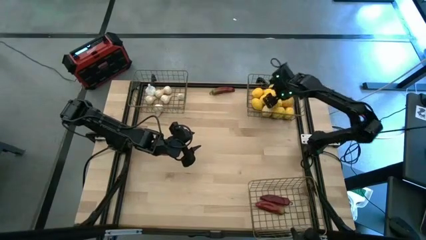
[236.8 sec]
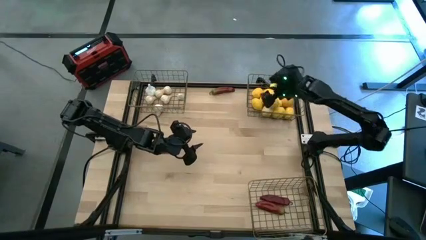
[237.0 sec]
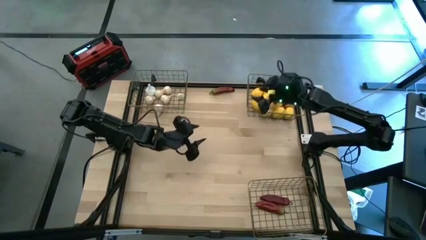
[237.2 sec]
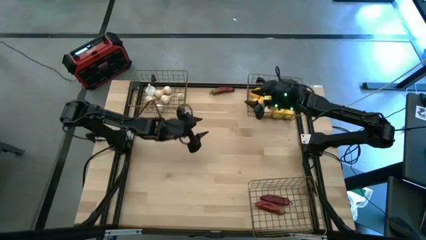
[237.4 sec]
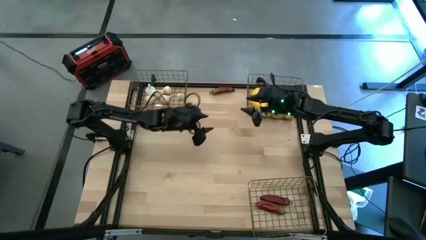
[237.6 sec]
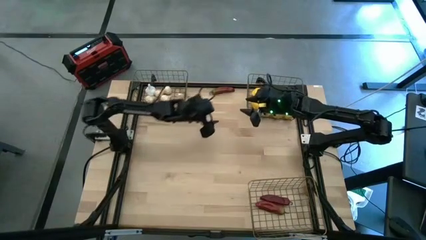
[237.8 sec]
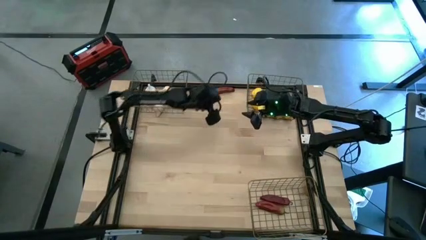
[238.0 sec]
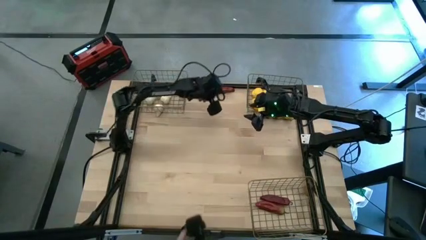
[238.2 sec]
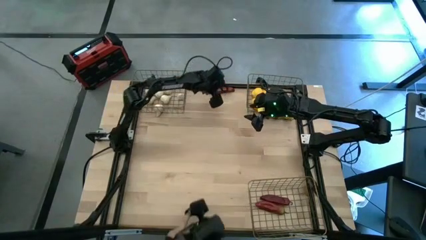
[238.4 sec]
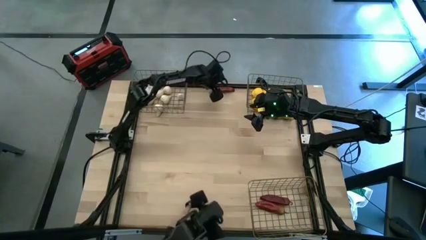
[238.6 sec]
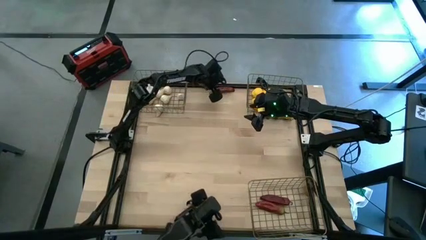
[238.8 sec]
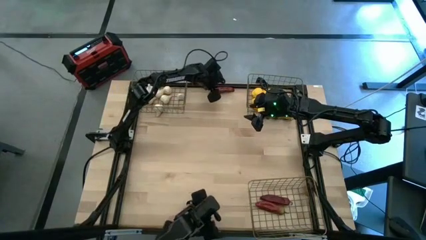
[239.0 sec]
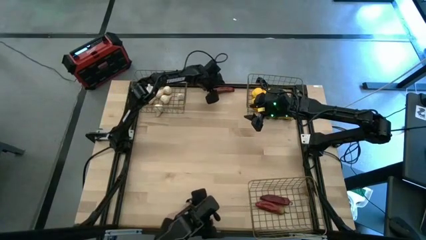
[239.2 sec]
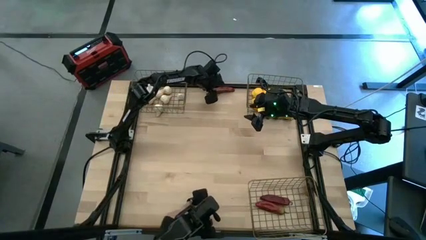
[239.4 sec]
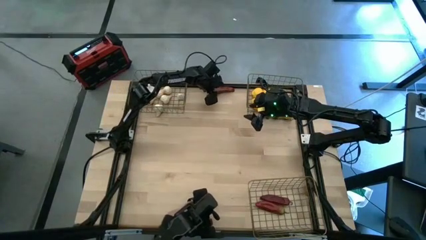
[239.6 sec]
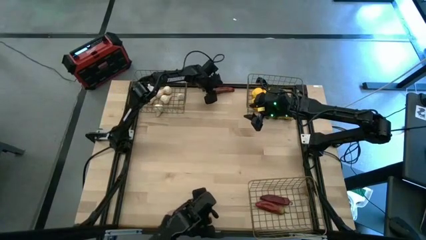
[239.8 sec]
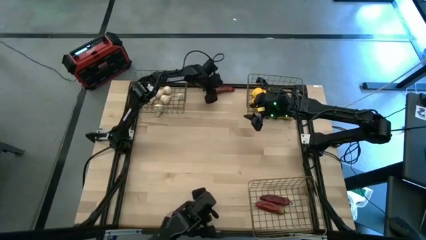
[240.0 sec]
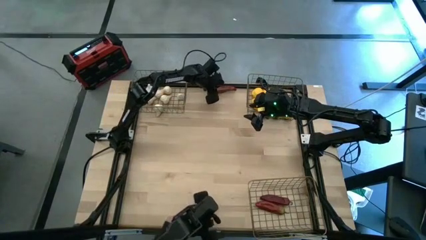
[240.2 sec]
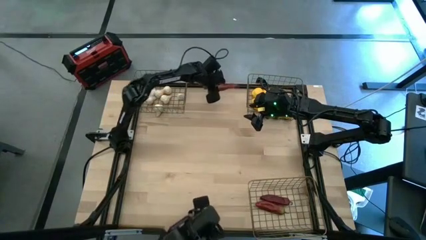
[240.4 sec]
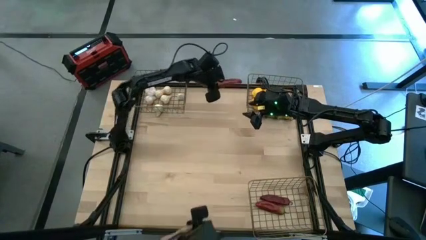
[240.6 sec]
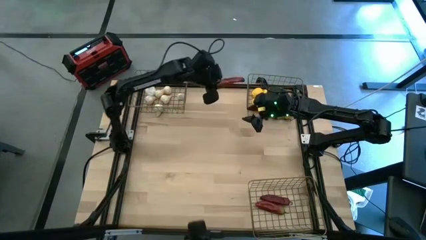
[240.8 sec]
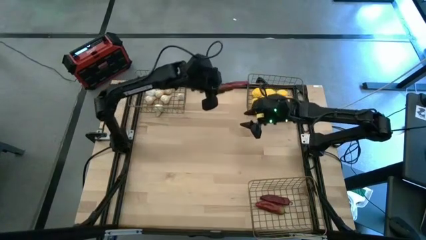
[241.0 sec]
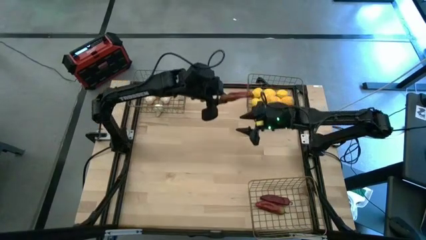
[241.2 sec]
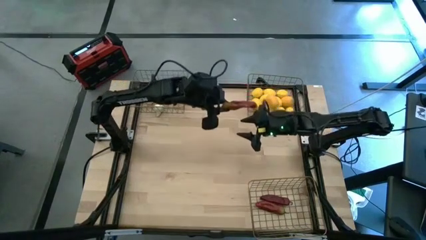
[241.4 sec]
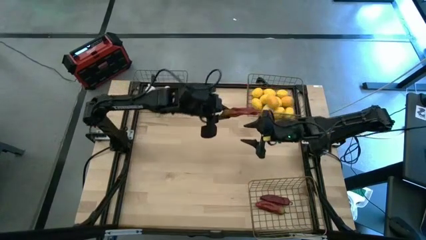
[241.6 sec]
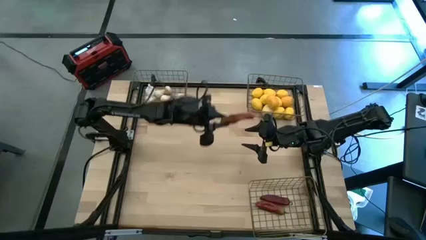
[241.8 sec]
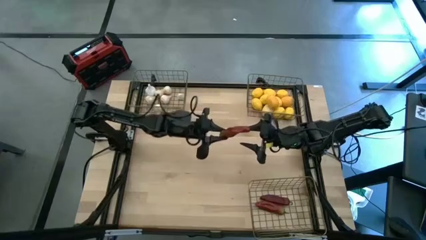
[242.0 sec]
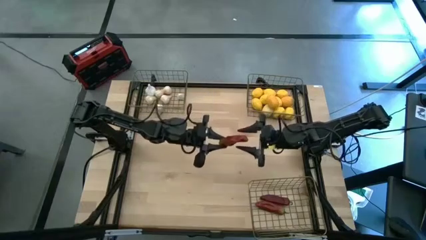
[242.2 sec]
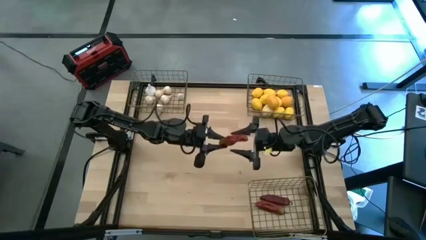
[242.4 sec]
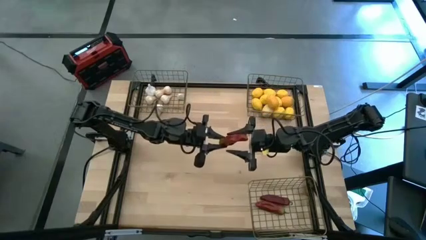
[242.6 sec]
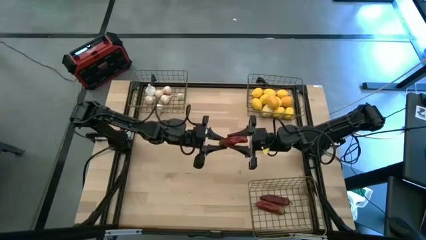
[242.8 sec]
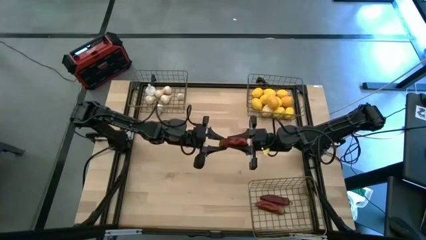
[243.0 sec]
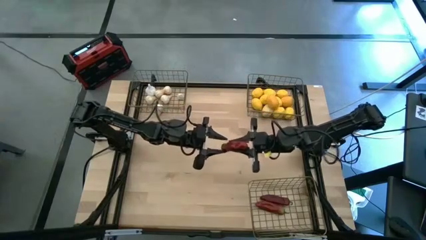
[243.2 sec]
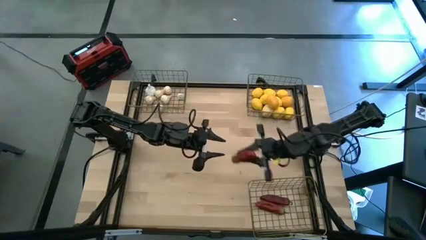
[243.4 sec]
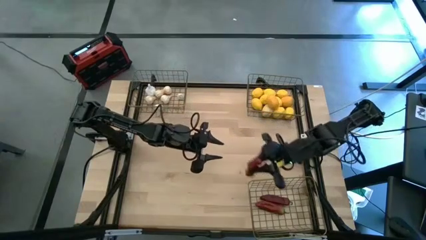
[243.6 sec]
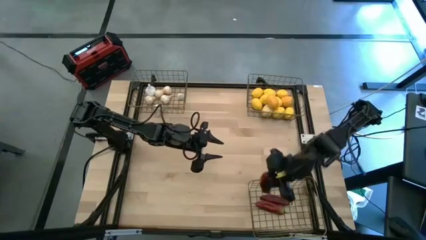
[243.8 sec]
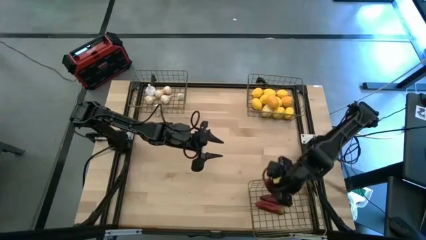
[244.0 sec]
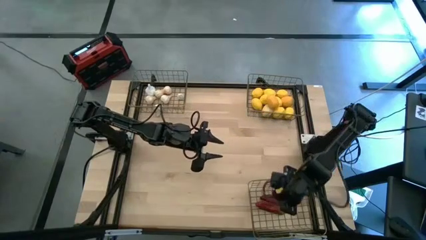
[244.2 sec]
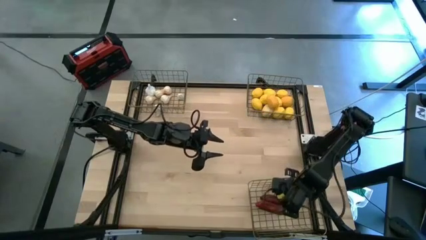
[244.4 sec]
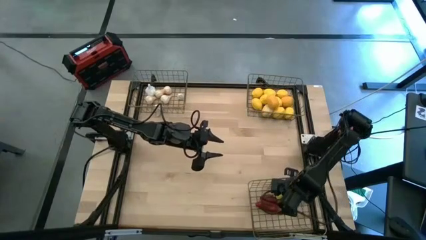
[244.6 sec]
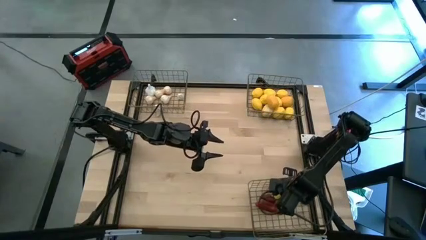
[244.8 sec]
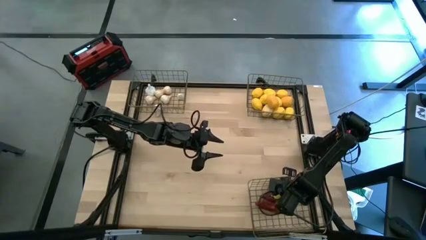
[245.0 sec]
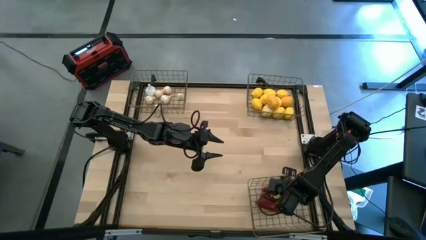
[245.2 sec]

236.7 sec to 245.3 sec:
Task: Sort produce into baskets
Put the red chili pepper into the bottom wire basket

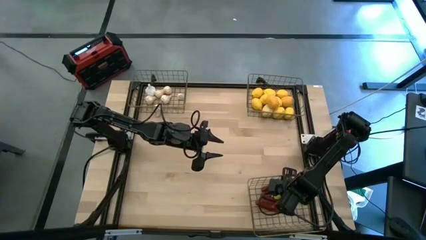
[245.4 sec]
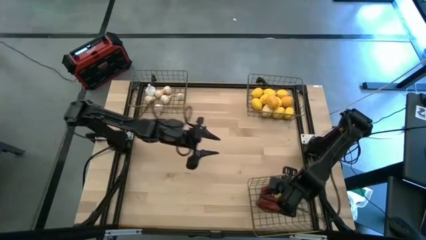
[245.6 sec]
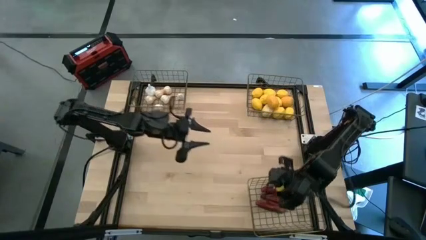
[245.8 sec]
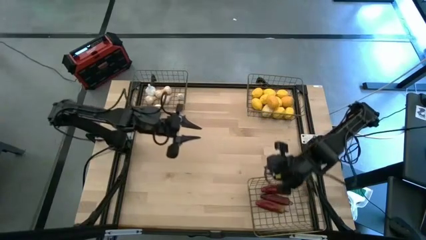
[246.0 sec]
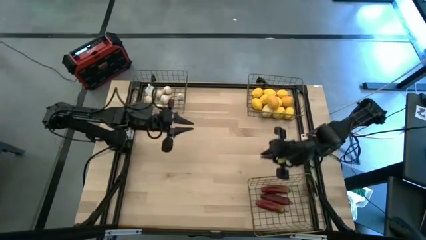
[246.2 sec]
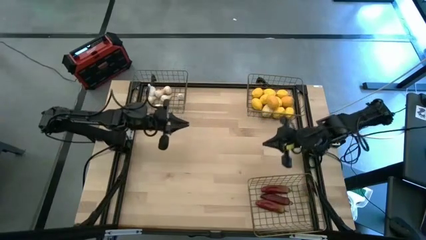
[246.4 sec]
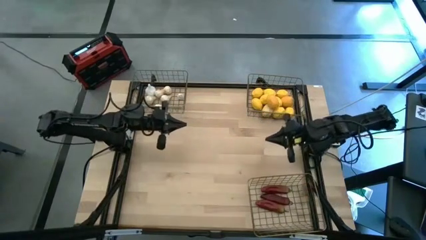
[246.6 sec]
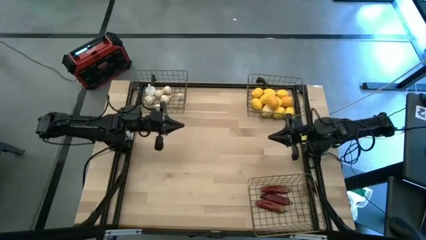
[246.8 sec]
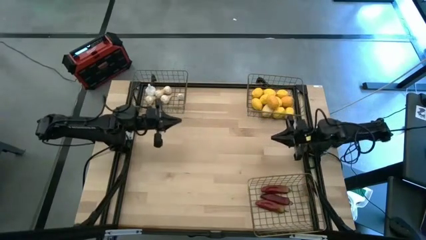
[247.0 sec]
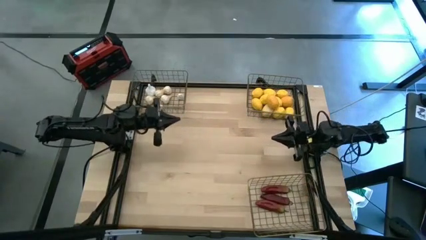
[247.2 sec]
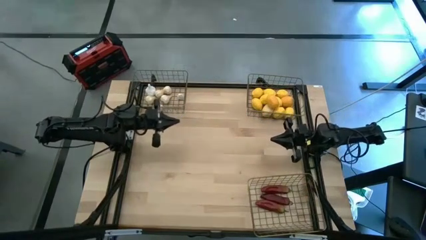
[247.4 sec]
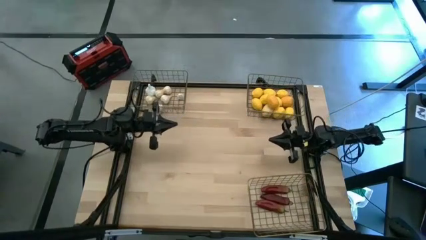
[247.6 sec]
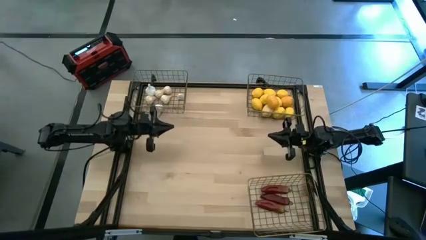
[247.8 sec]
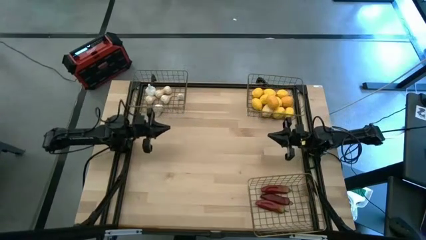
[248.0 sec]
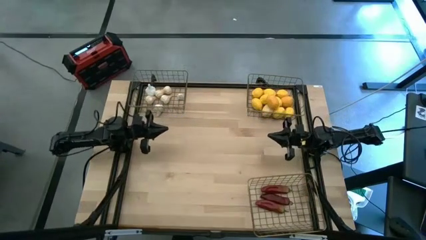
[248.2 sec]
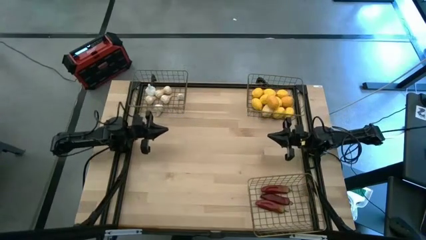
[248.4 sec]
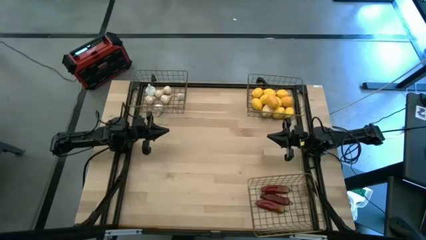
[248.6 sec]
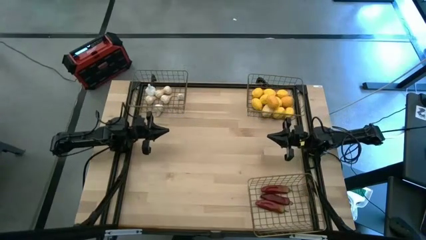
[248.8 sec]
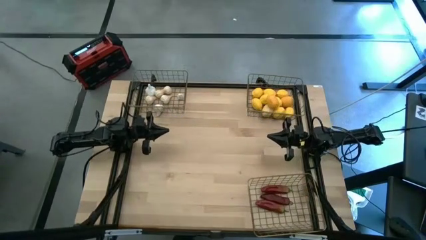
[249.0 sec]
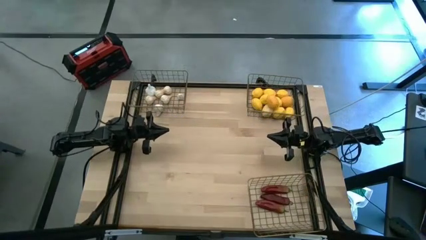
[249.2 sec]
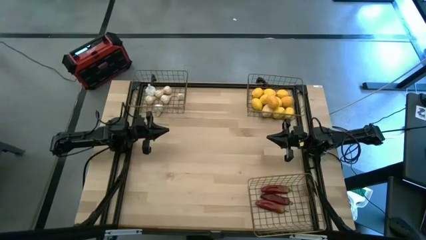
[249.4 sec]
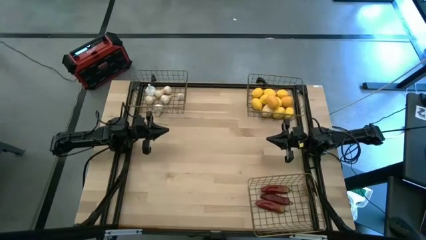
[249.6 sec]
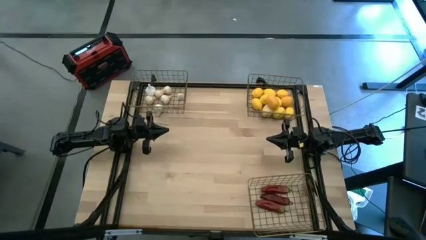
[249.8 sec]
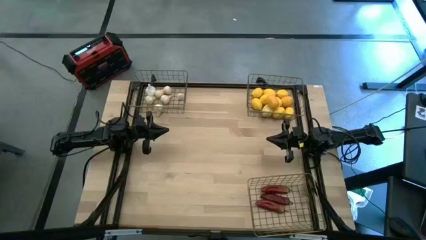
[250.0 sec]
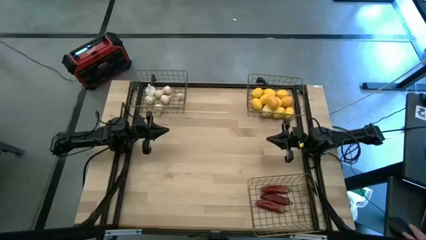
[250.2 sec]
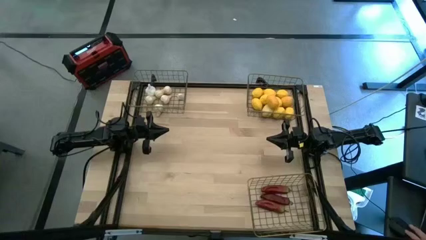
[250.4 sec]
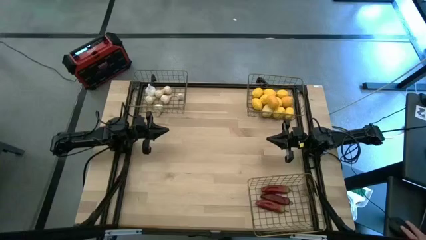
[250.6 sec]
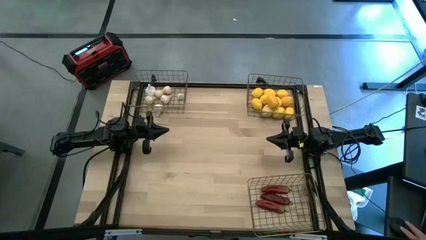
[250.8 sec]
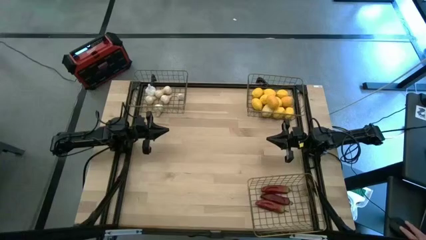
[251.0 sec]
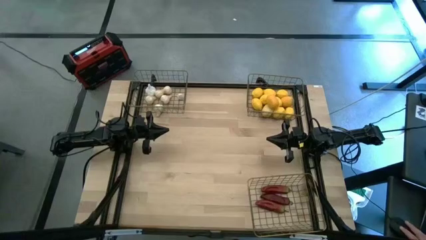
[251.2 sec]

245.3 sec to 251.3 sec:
Return to Home Position
